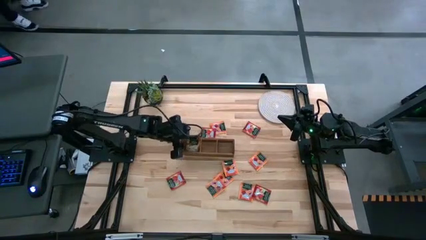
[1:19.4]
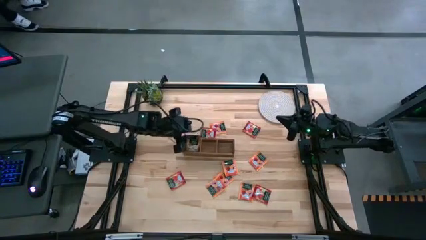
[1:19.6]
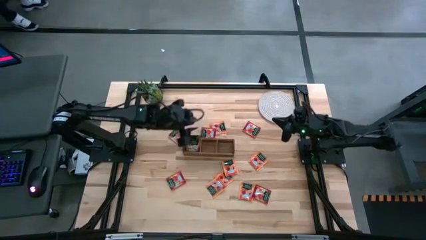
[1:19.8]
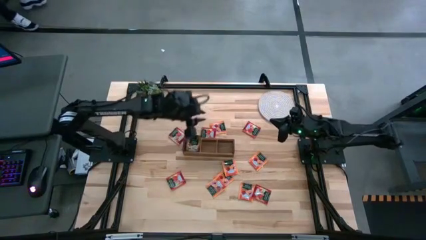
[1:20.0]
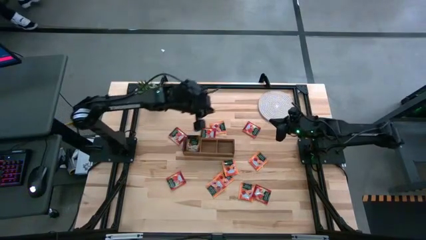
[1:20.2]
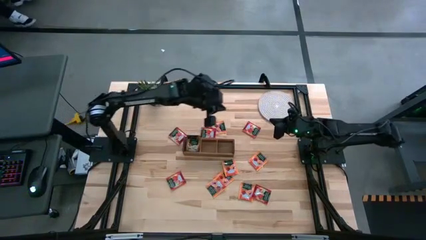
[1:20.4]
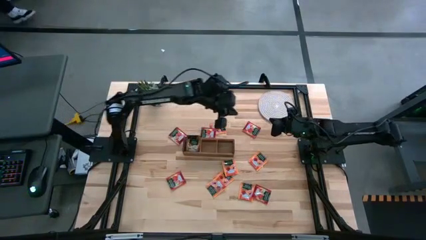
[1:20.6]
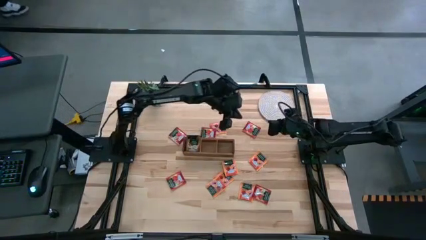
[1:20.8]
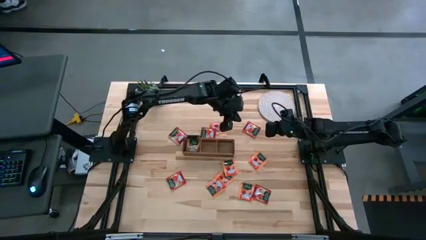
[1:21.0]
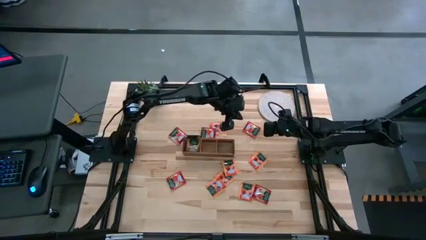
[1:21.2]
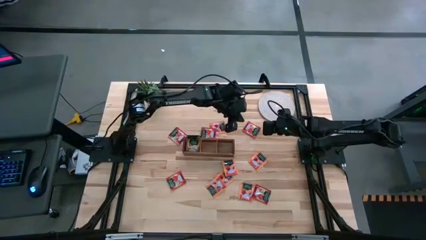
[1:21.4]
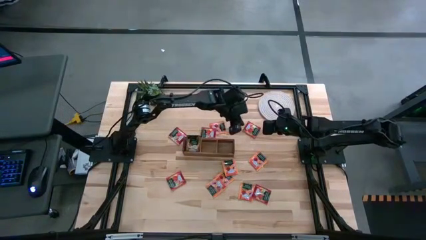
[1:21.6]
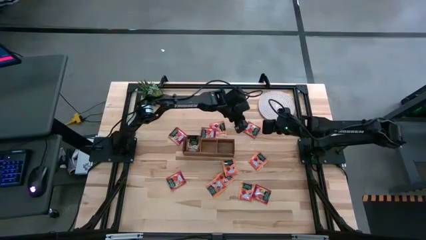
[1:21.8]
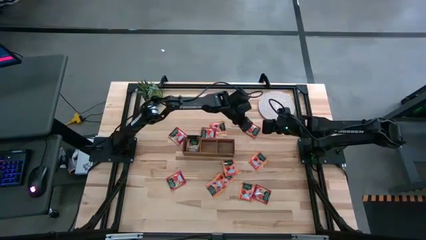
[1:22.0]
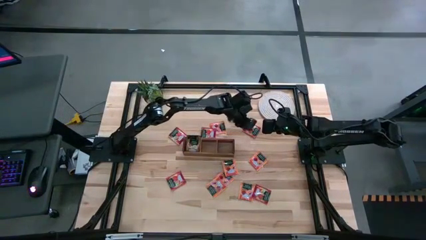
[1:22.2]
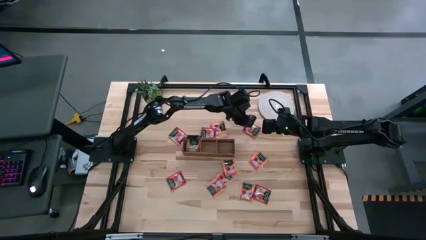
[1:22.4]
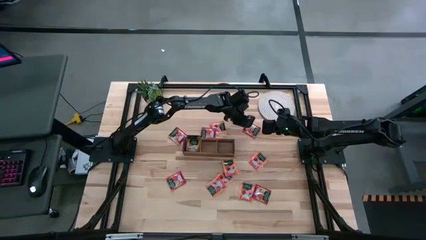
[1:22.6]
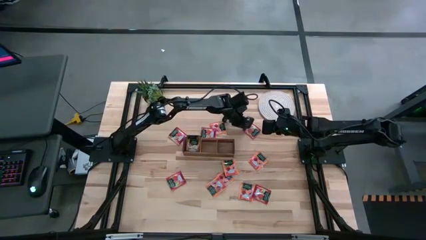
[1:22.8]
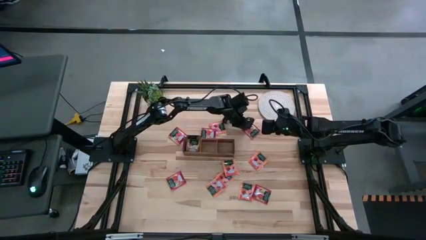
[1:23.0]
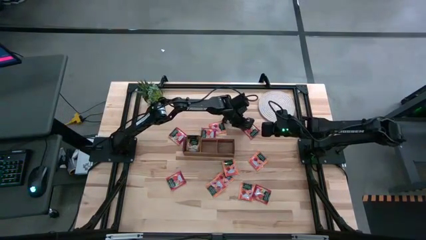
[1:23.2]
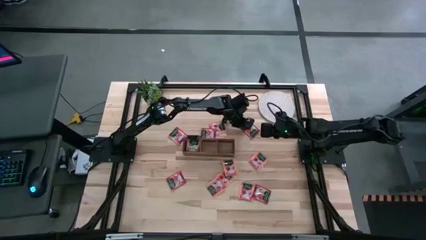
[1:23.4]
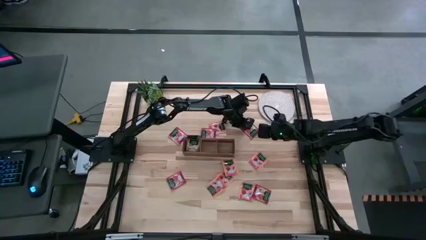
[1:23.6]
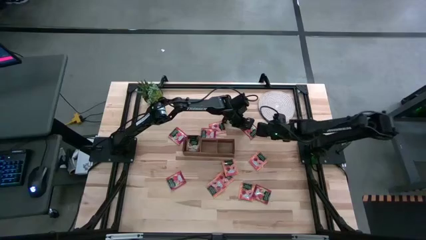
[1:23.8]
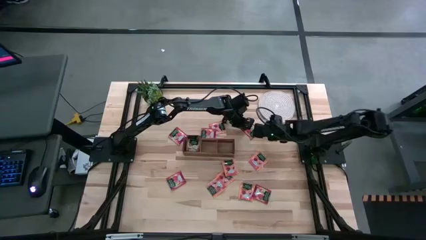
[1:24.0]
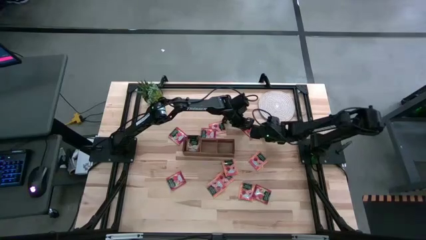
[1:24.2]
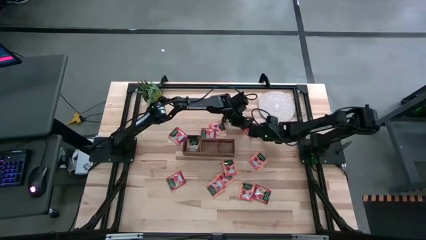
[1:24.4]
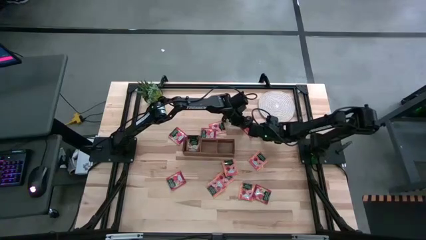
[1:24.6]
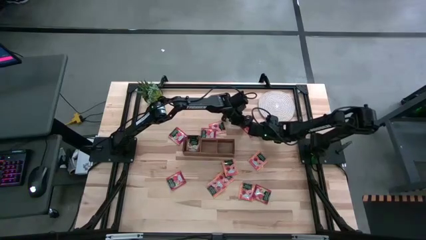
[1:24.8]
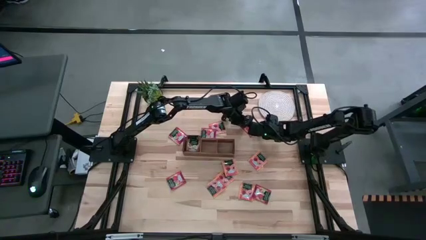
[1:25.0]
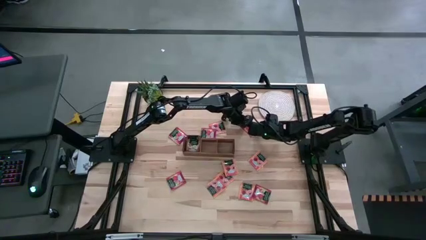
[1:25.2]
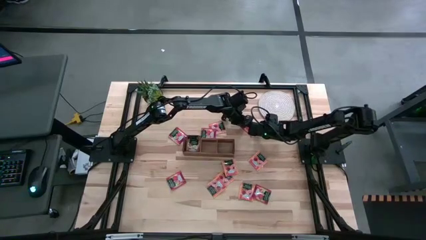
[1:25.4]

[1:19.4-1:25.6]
Task: Pick & Place Tea
Put the red tea bag into the middle section of the brown wooden organizer

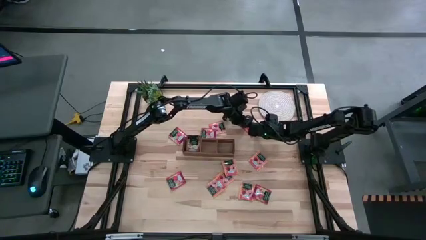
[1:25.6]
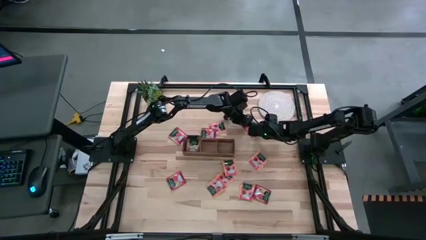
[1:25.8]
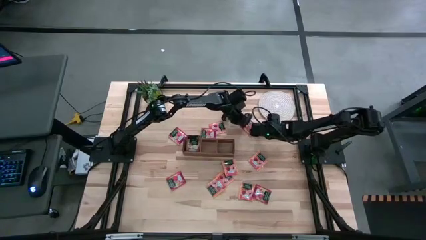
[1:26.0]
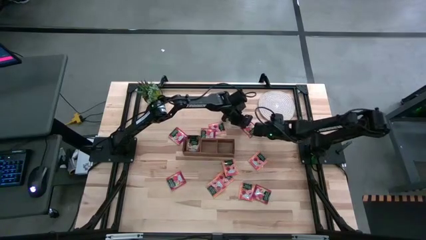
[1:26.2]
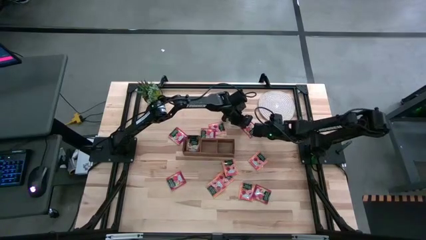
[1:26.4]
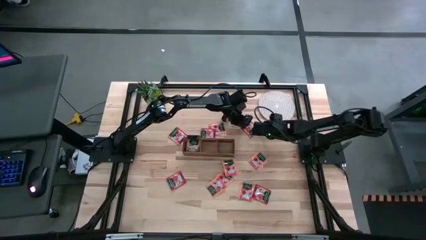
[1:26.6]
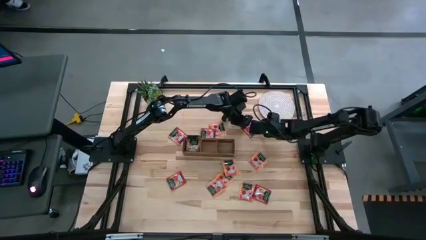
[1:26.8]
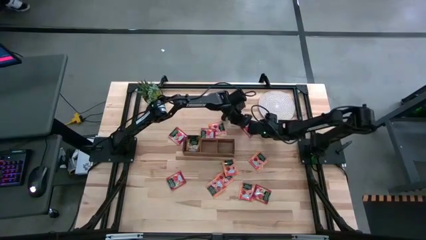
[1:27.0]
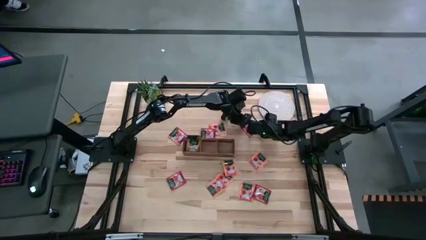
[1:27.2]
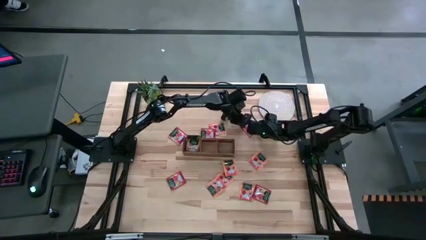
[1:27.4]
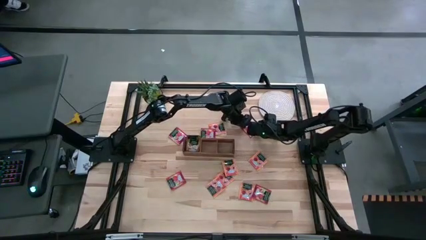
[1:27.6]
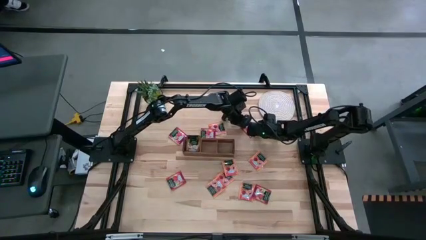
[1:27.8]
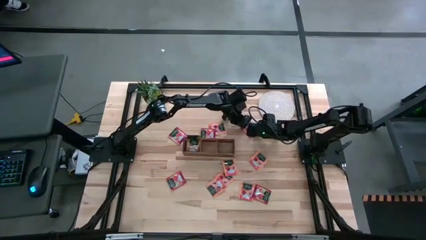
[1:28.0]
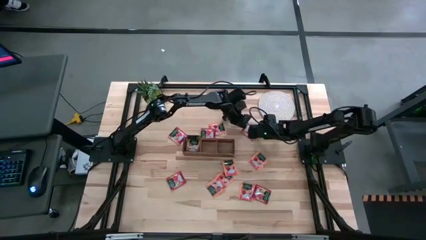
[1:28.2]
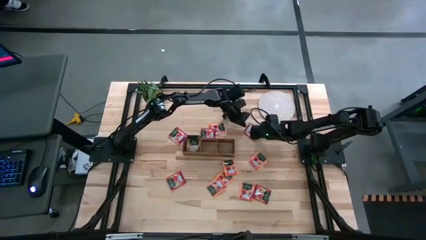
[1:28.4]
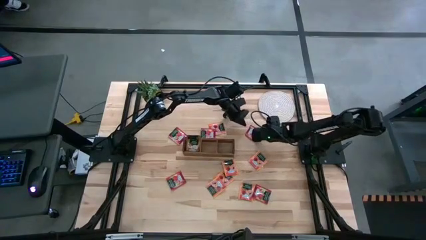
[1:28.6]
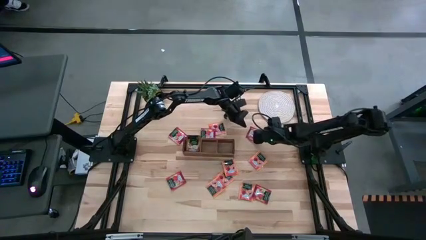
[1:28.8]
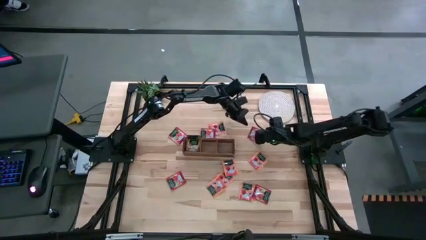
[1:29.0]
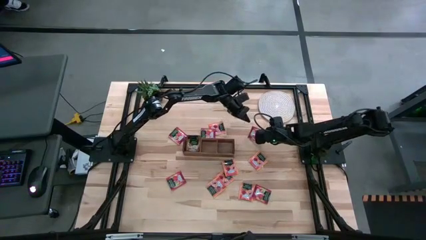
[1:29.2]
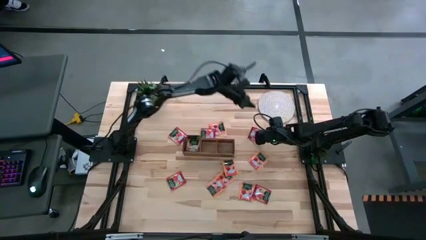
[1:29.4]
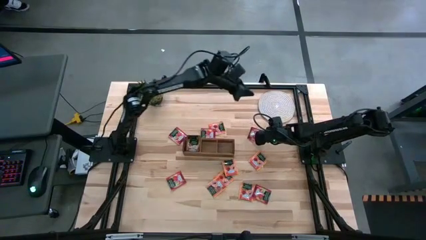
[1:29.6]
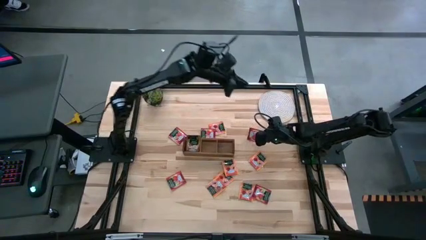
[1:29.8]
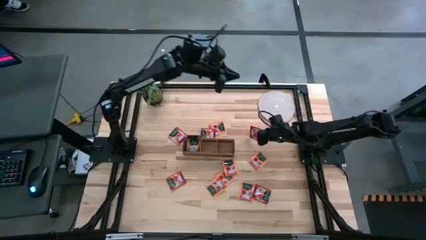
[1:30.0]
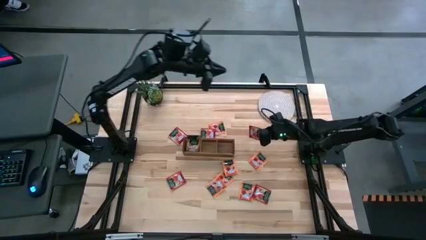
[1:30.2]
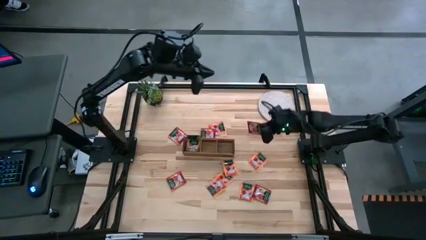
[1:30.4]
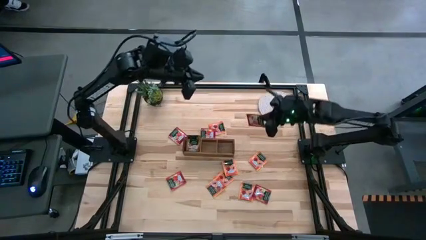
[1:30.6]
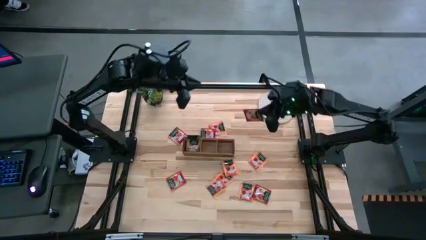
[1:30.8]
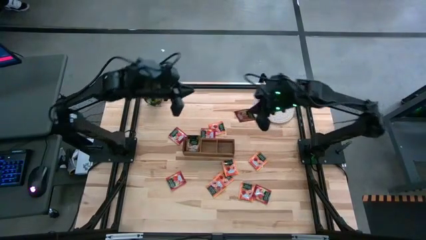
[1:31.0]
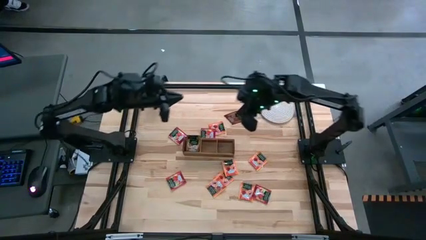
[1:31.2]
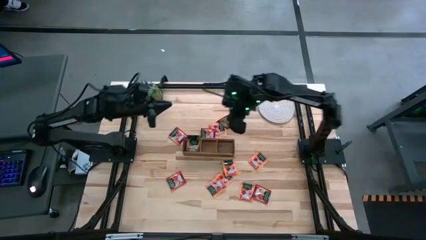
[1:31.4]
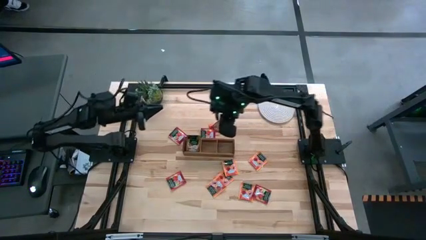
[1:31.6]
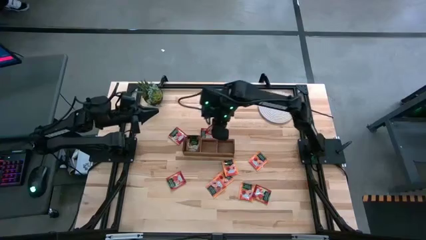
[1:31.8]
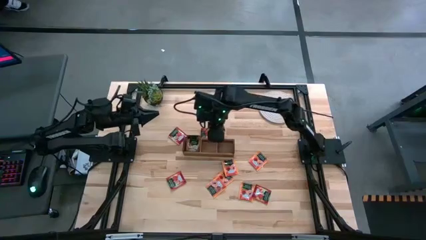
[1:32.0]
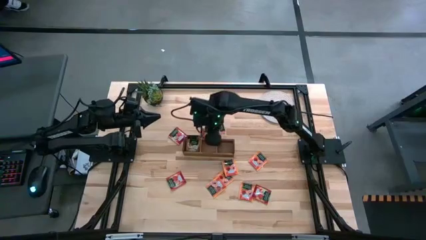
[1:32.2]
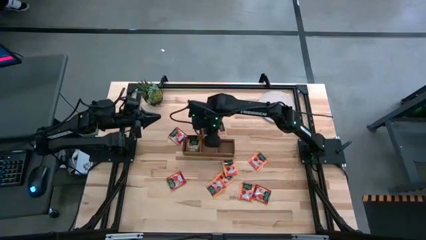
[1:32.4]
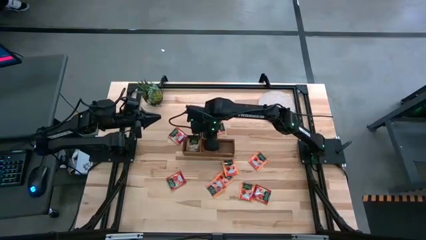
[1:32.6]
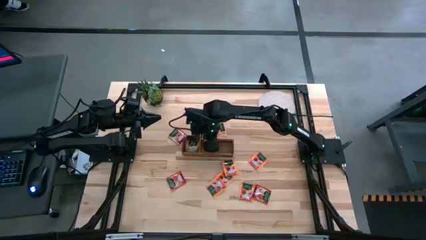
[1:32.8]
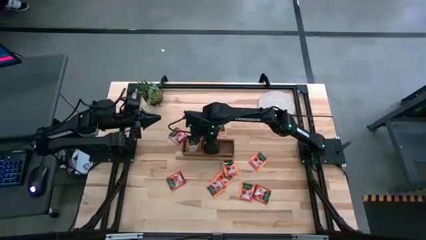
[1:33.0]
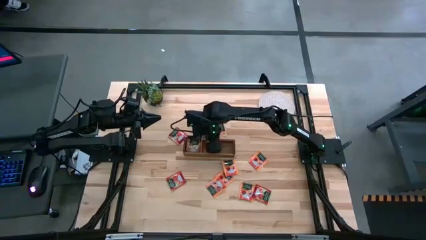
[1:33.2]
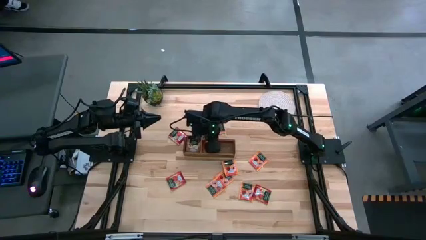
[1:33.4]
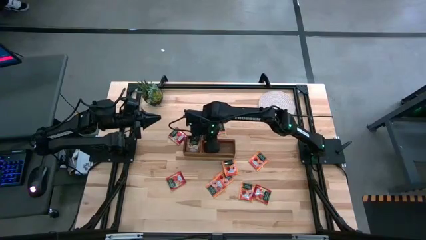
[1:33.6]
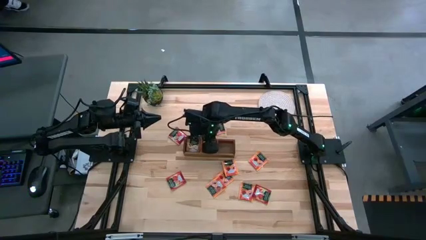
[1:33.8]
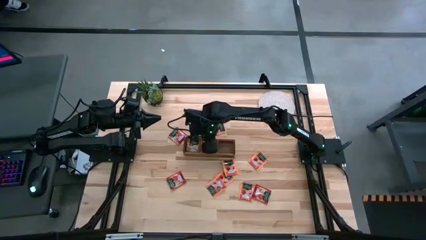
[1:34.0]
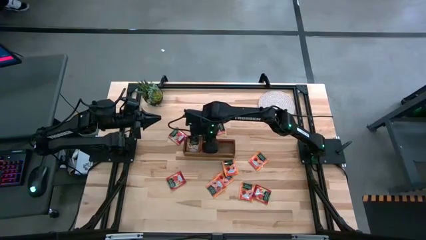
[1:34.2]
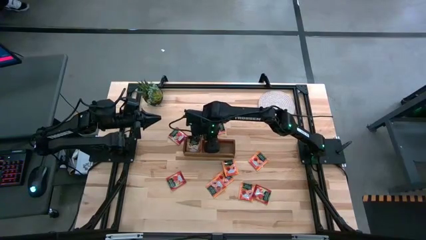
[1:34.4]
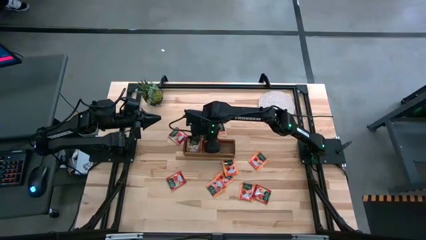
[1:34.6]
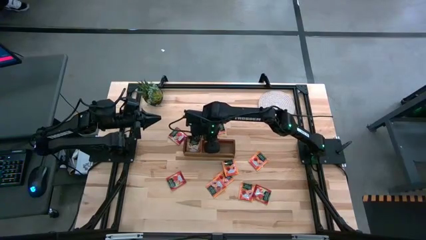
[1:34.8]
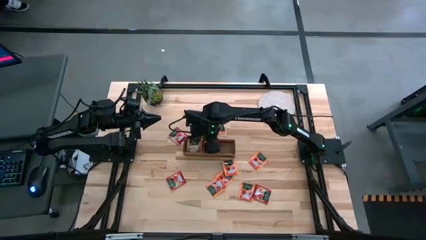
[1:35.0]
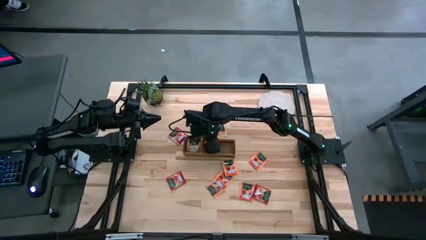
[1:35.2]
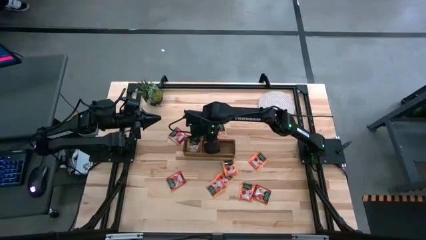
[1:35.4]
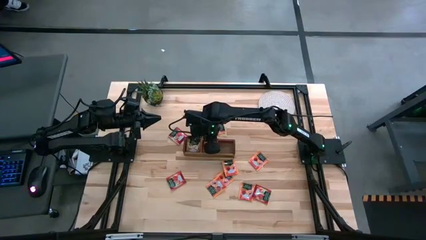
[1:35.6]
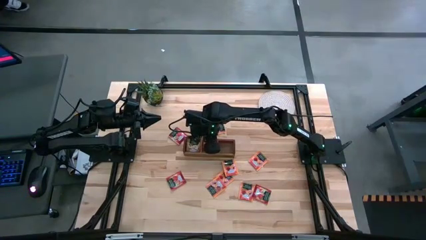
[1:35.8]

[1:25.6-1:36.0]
Put the red tea bag into the middle section of the brown wooden organizer
